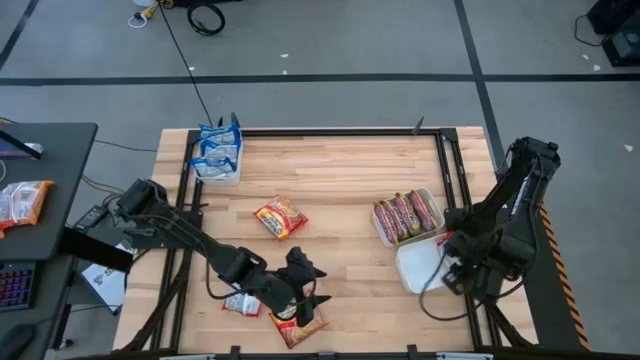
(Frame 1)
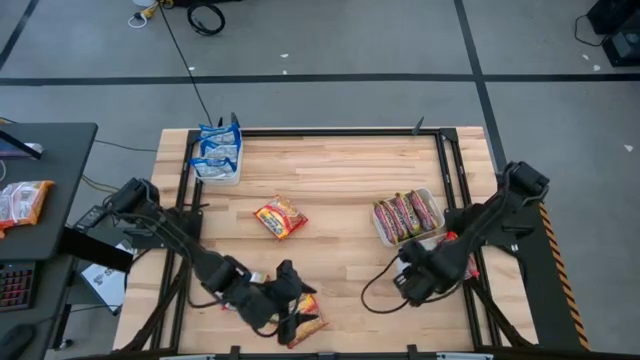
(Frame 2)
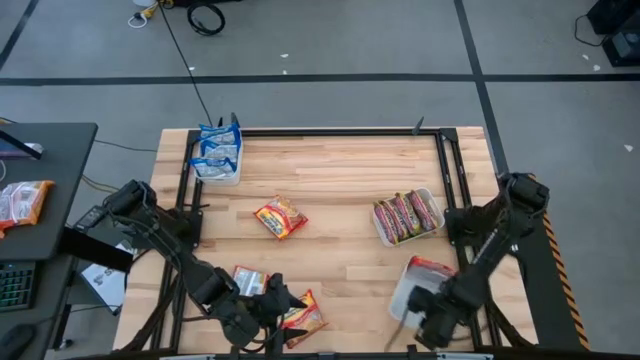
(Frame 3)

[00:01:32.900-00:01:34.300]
Task: Sort Maruchan noodles
Adjust the bottom white bin

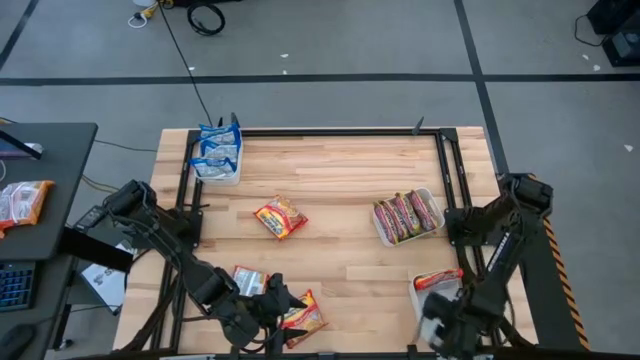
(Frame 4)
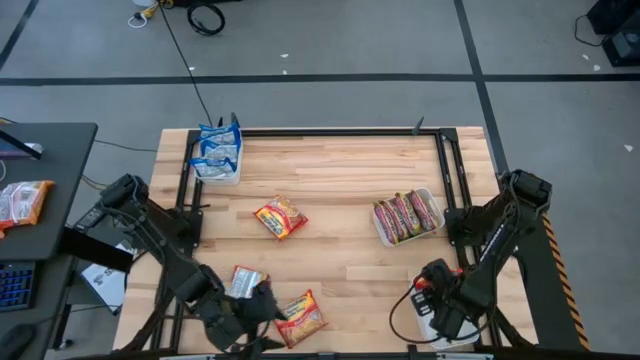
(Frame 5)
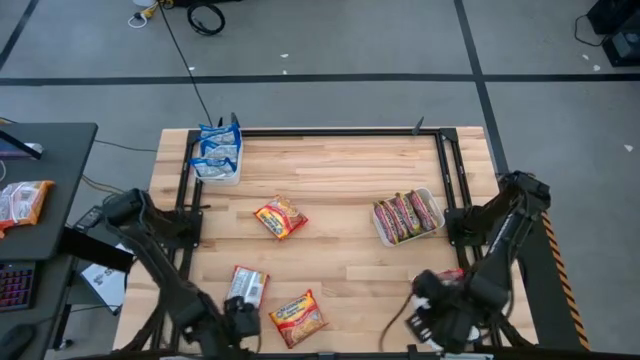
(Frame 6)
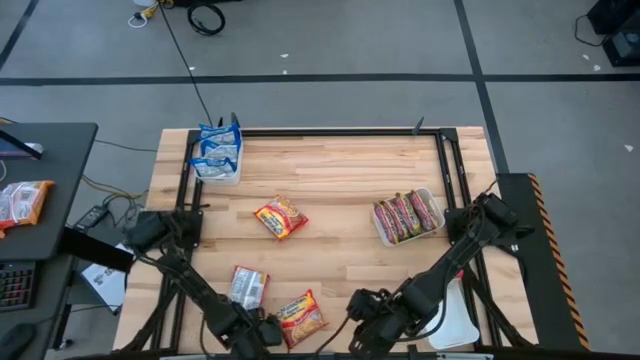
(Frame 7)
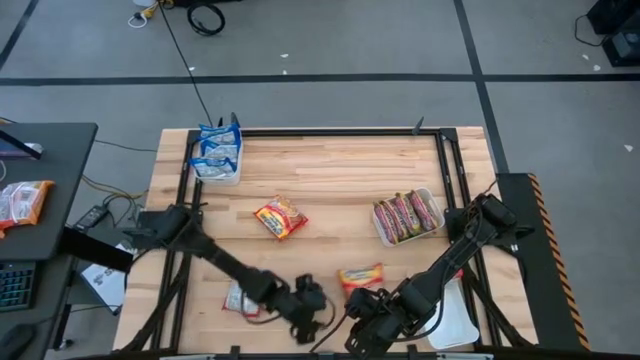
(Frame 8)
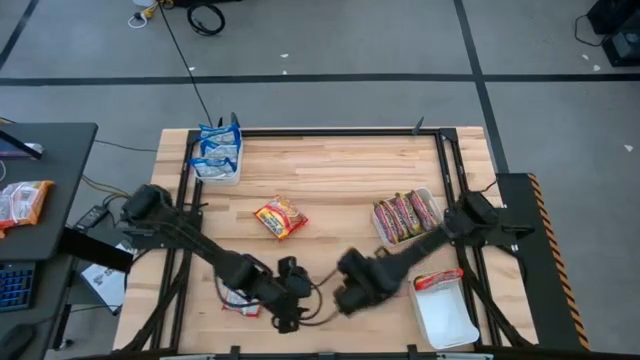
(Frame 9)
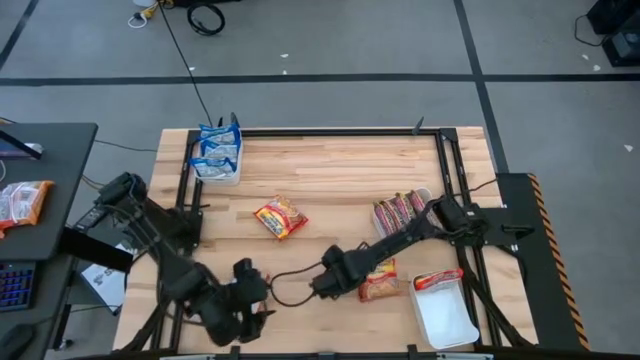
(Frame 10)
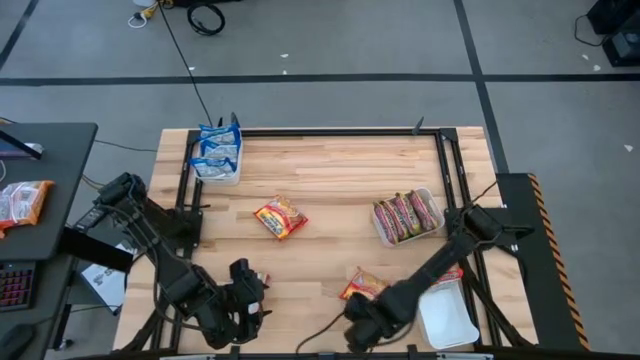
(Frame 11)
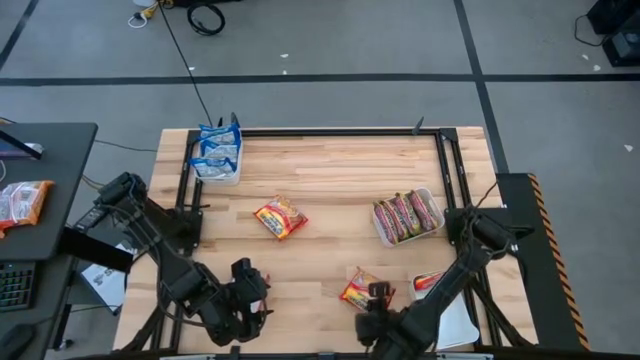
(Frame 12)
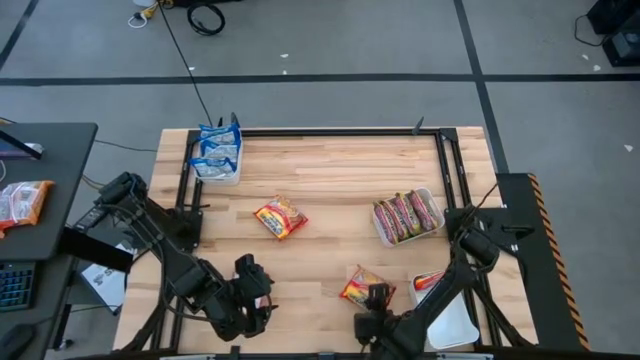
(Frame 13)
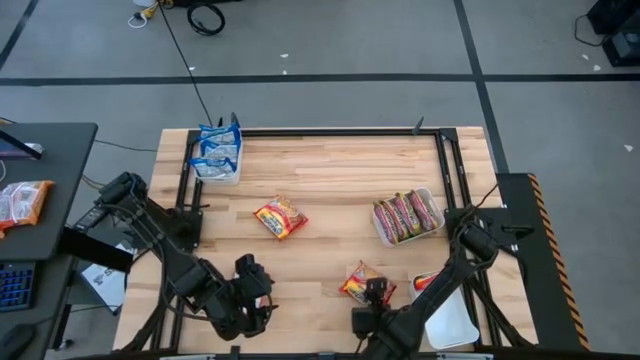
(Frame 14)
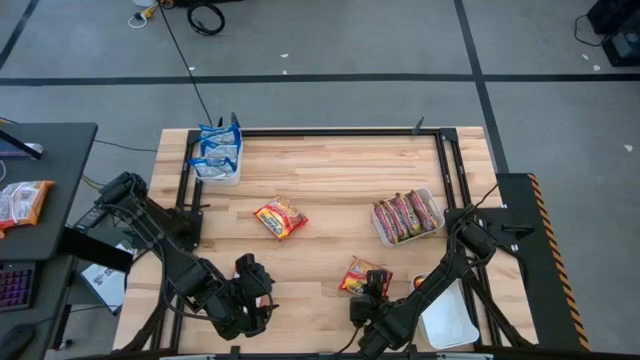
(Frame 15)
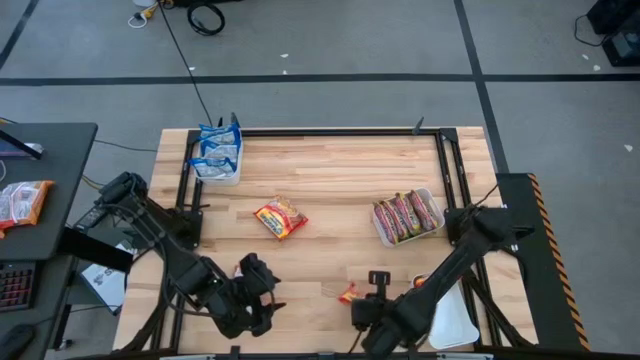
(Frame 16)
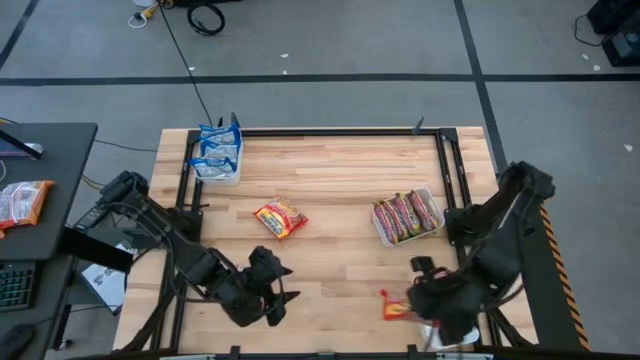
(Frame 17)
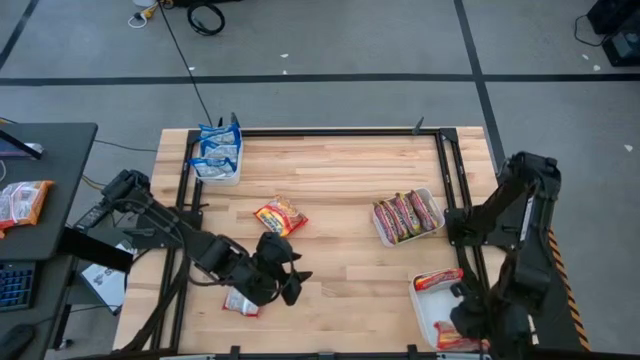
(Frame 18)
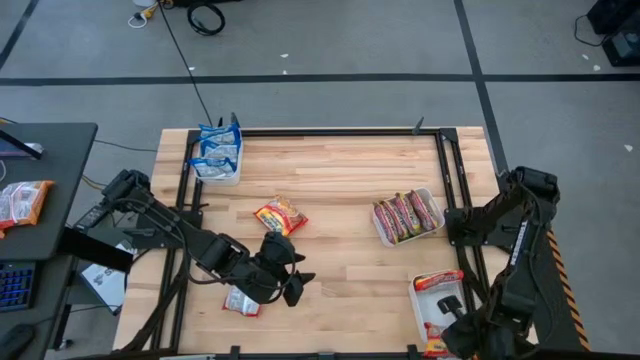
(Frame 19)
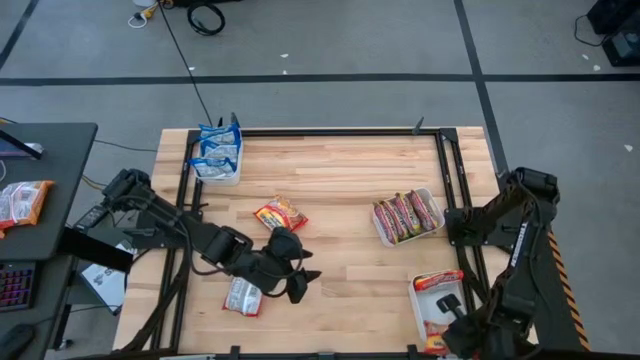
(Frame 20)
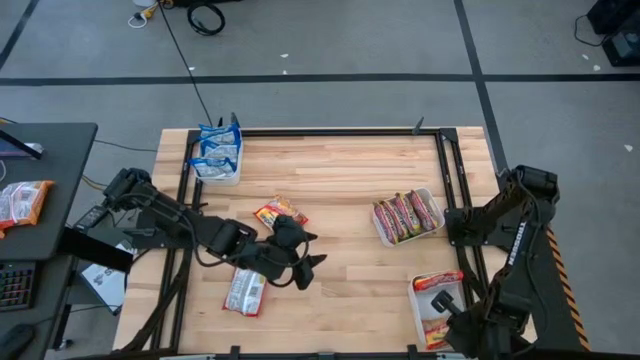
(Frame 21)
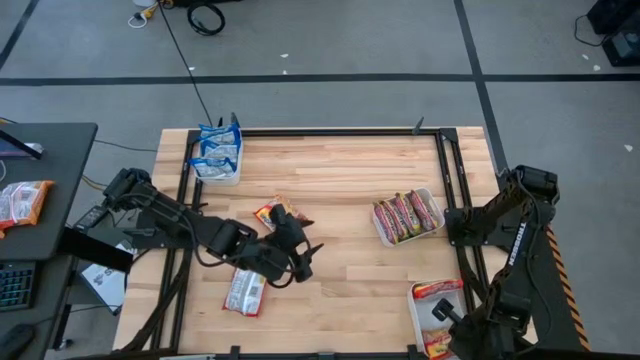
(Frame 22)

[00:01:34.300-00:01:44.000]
Put the orange noodle pack into the bottom white bin

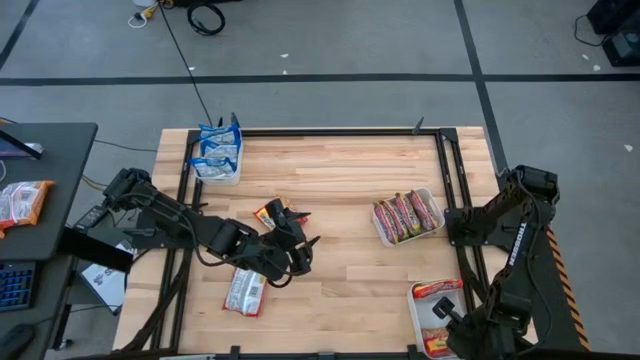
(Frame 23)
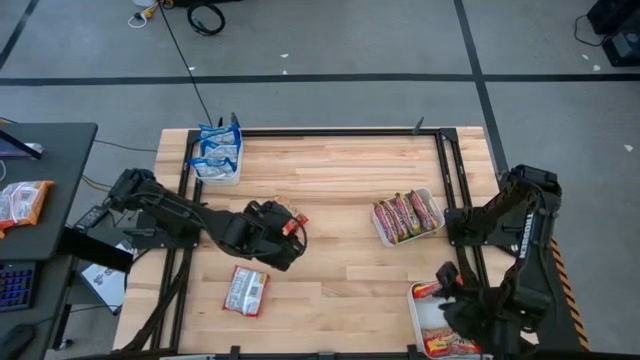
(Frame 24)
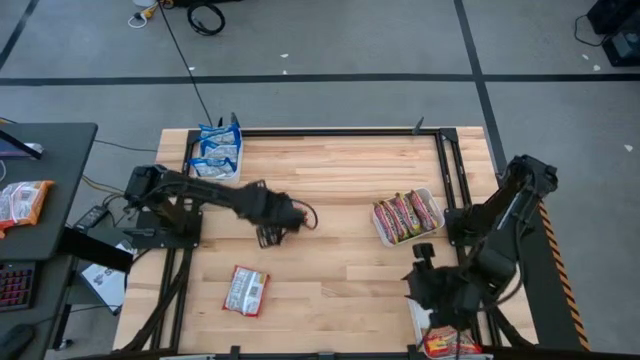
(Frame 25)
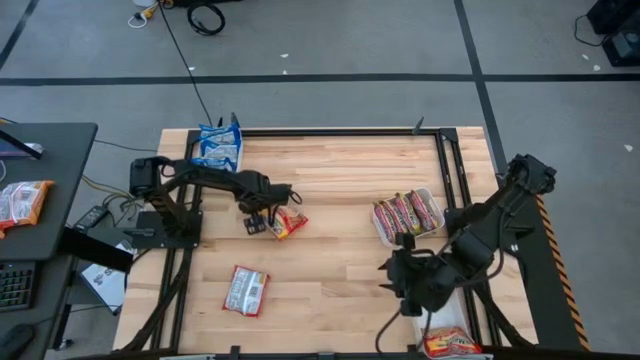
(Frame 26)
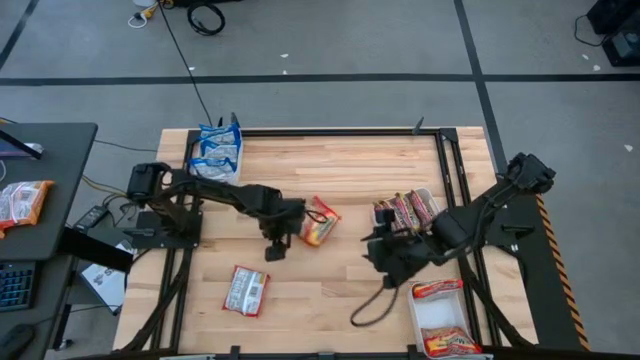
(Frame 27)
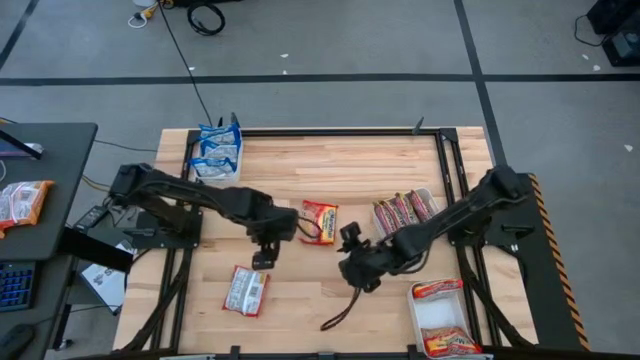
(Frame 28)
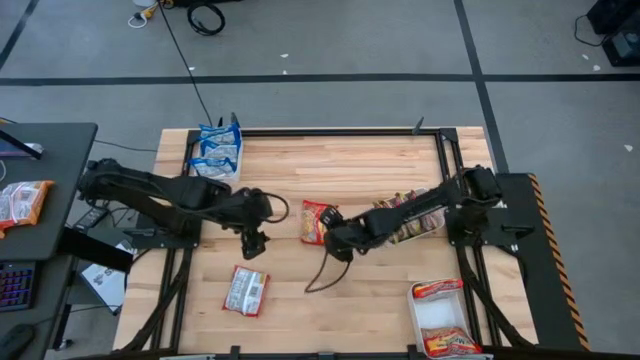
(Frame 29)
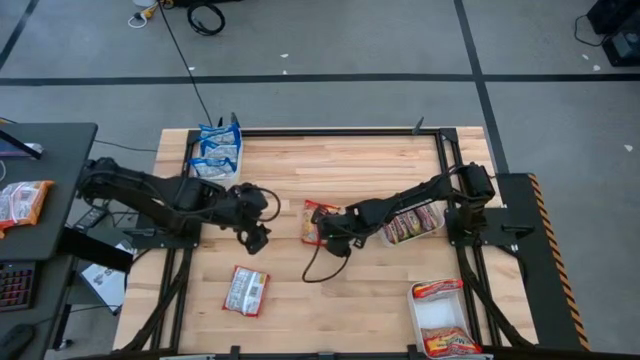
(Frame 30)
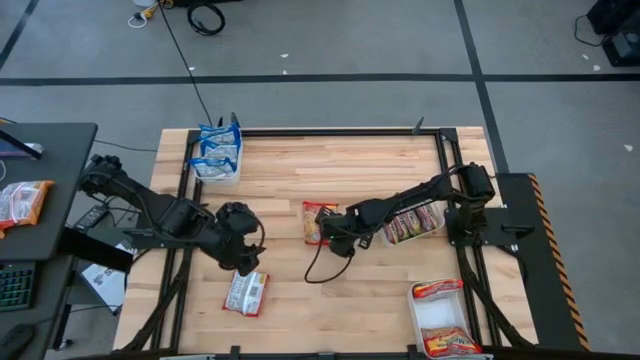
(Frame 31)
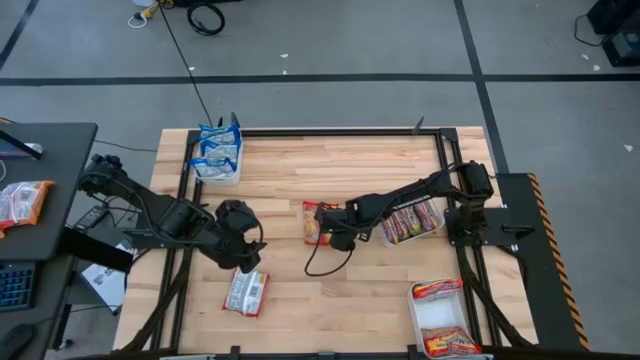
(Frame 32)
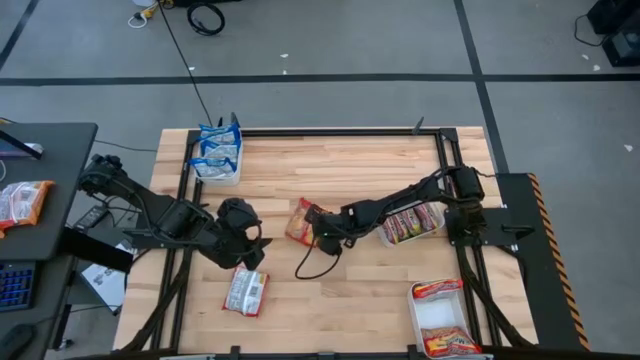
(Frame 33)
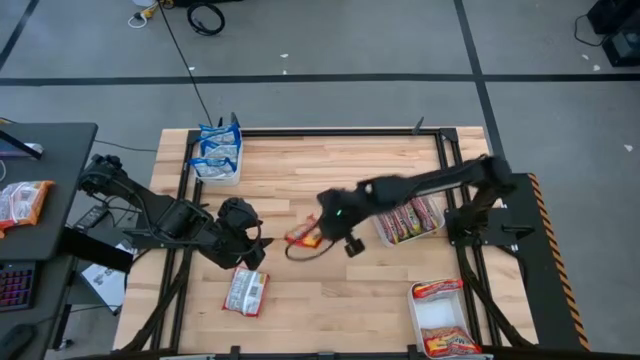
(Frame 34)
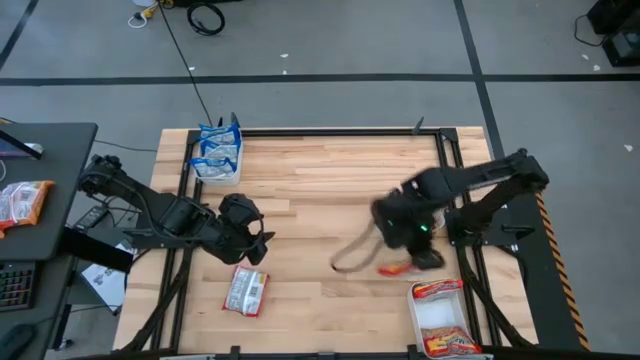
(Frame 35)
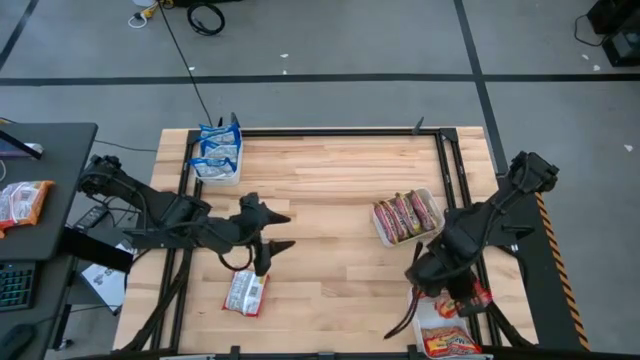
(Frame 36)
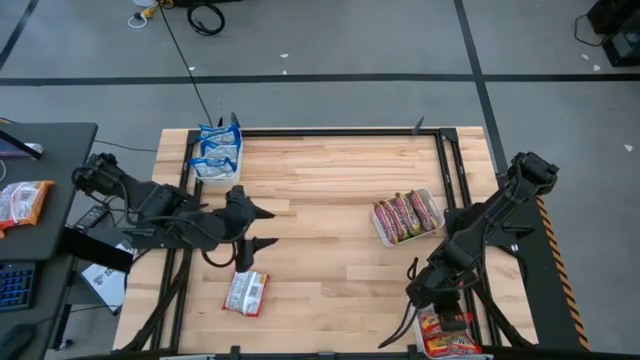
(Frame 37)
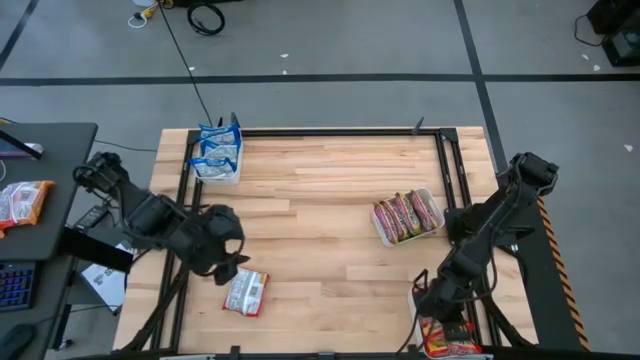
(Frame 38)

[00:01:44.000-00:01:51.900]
Put the orange noodle pack into the bottom white bin
